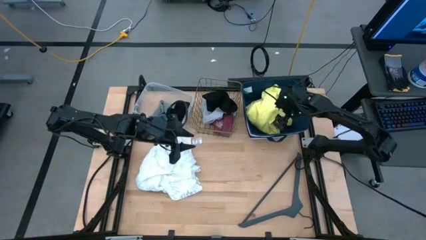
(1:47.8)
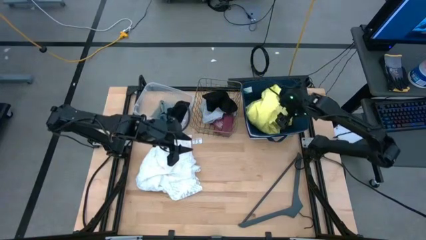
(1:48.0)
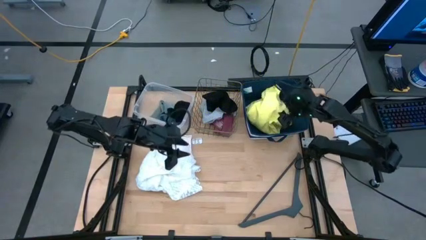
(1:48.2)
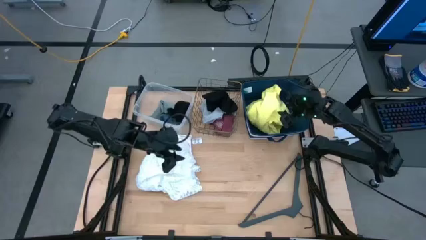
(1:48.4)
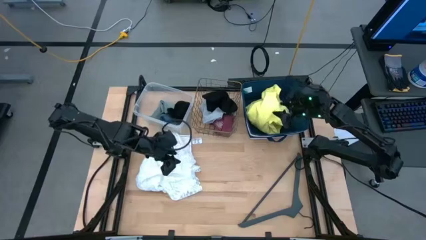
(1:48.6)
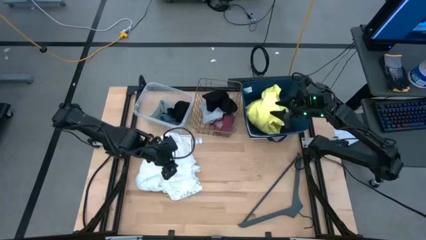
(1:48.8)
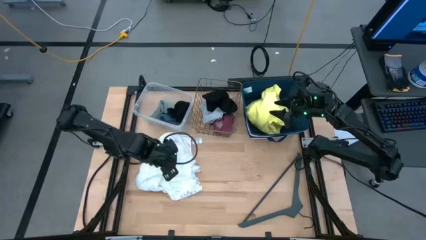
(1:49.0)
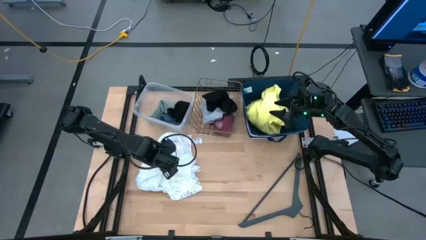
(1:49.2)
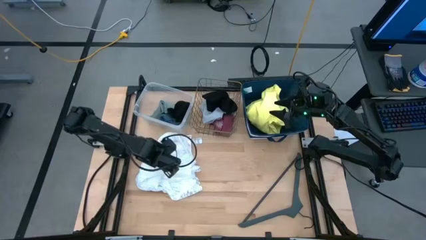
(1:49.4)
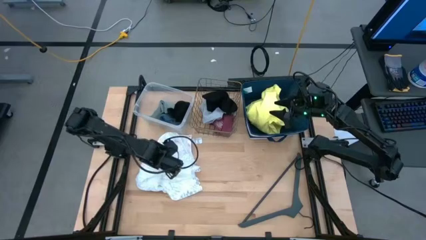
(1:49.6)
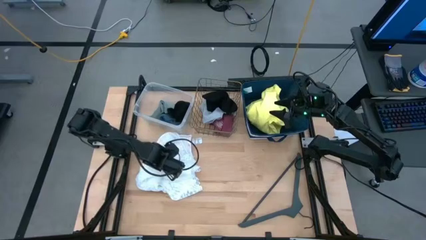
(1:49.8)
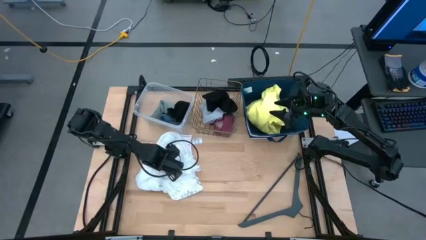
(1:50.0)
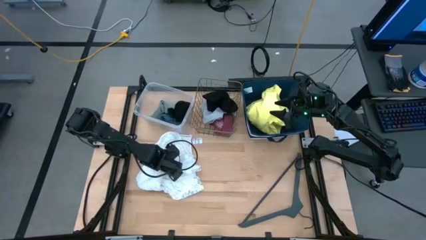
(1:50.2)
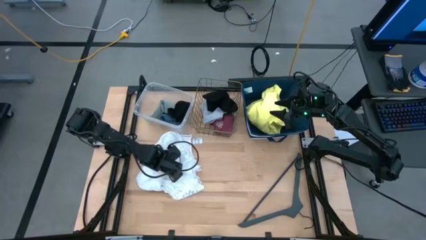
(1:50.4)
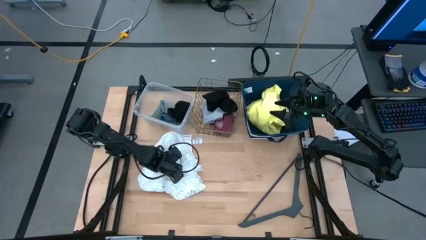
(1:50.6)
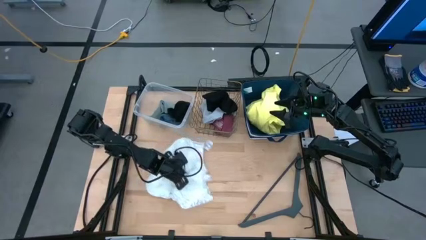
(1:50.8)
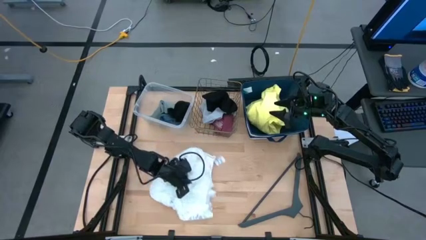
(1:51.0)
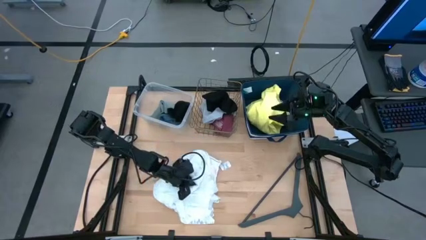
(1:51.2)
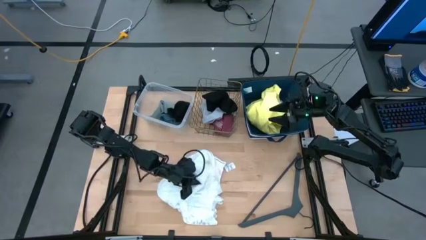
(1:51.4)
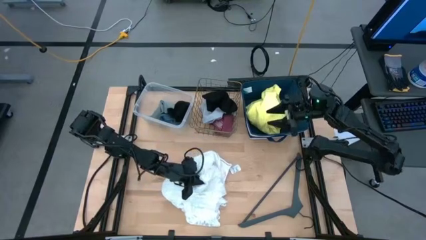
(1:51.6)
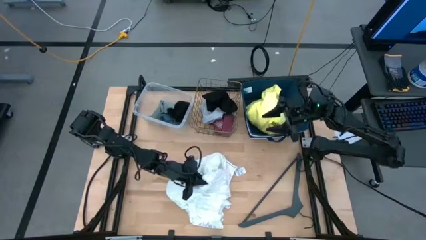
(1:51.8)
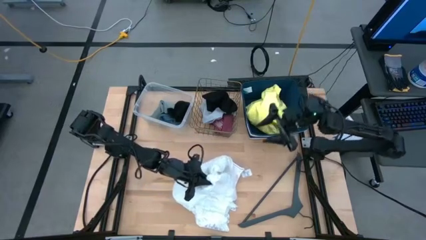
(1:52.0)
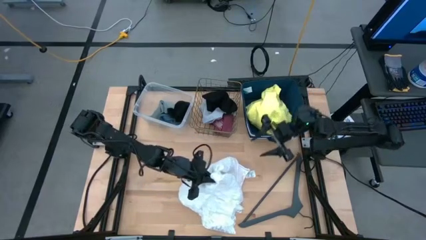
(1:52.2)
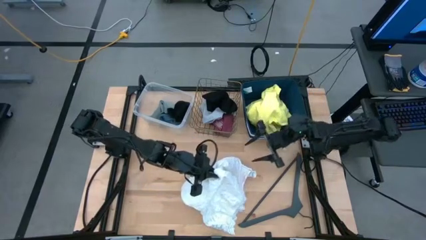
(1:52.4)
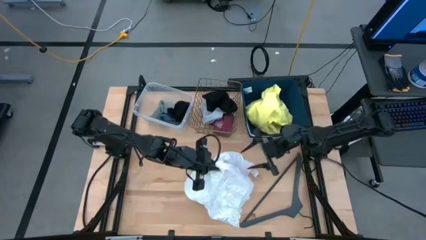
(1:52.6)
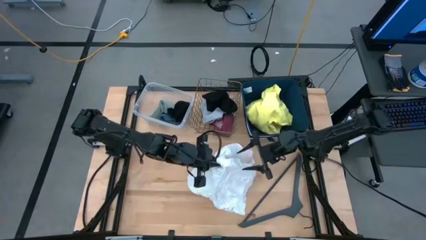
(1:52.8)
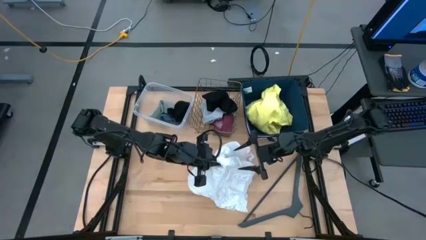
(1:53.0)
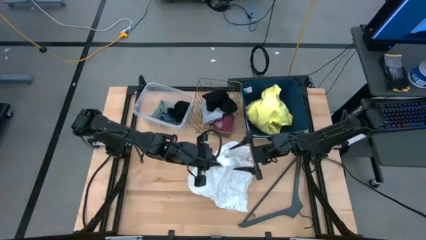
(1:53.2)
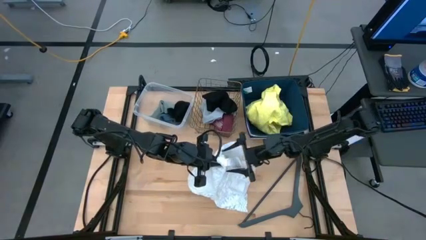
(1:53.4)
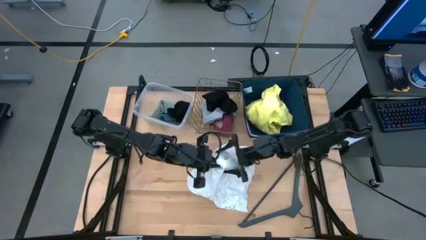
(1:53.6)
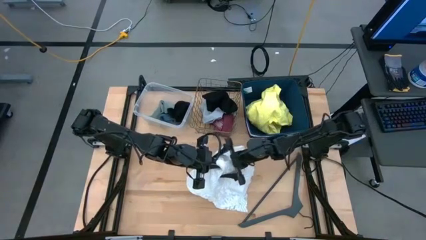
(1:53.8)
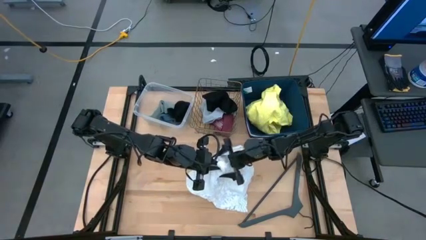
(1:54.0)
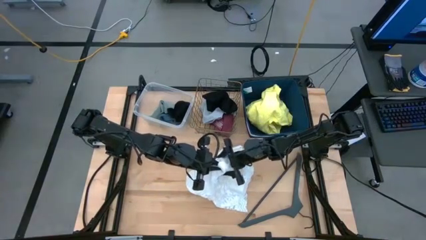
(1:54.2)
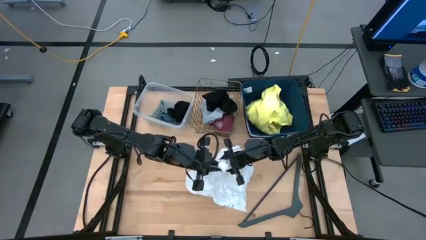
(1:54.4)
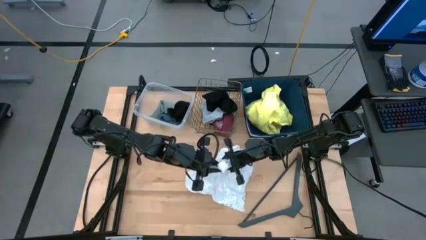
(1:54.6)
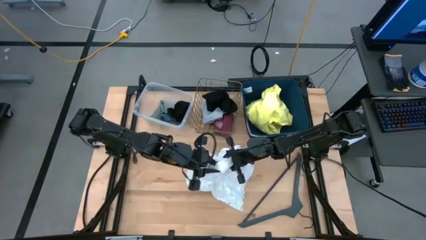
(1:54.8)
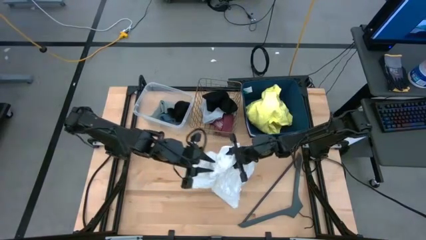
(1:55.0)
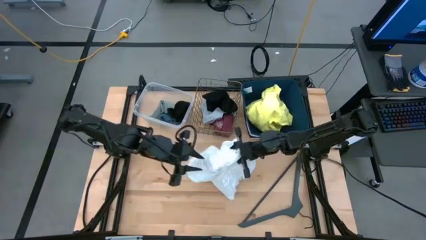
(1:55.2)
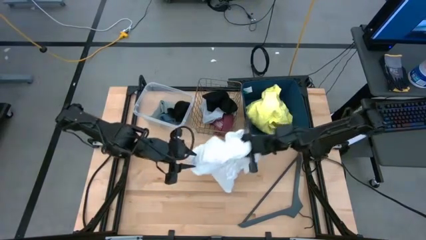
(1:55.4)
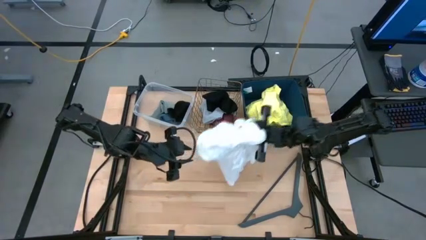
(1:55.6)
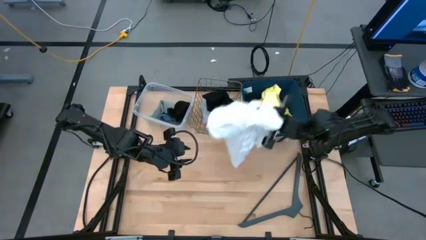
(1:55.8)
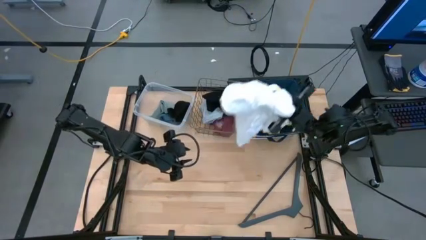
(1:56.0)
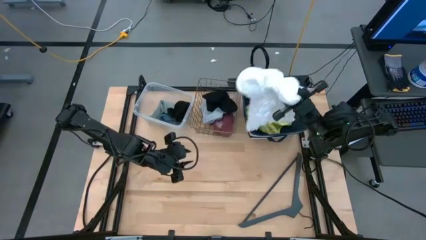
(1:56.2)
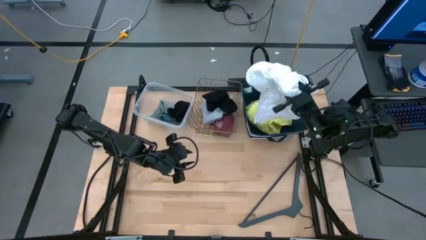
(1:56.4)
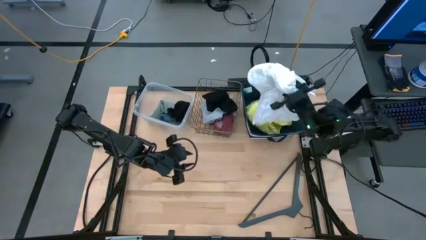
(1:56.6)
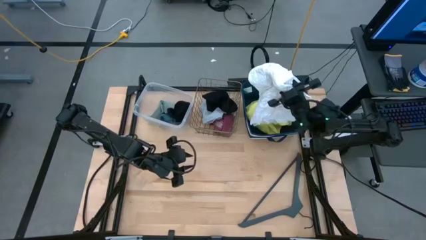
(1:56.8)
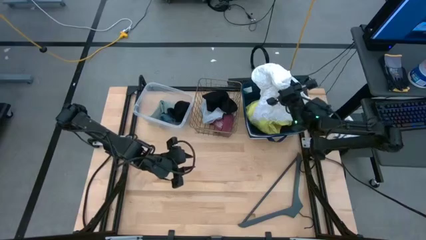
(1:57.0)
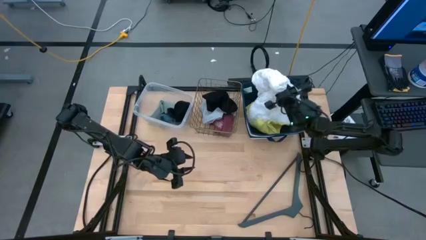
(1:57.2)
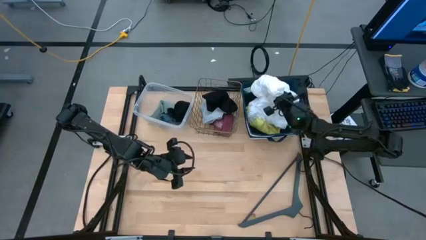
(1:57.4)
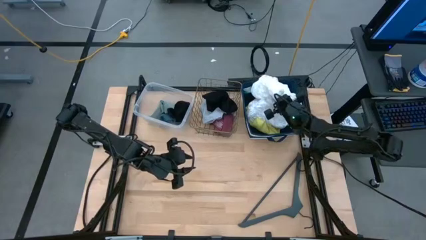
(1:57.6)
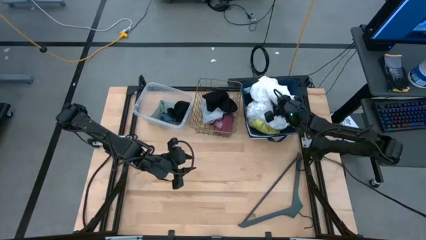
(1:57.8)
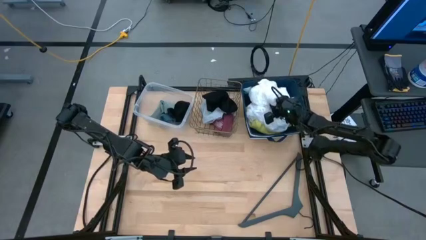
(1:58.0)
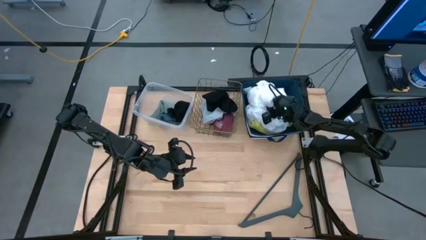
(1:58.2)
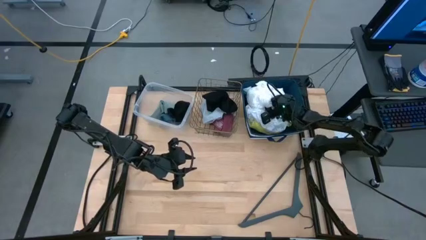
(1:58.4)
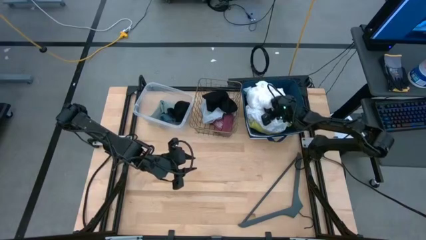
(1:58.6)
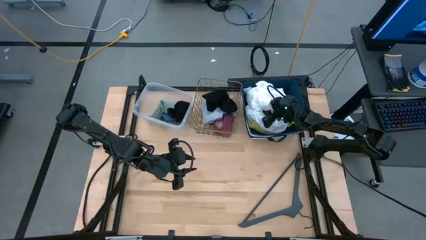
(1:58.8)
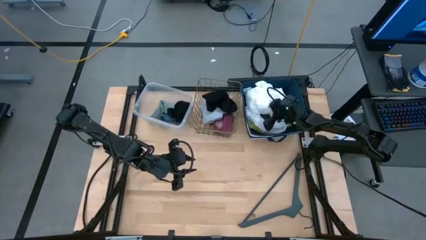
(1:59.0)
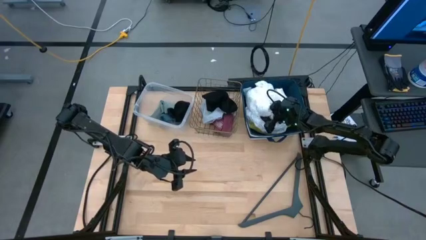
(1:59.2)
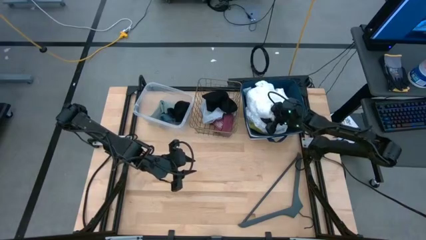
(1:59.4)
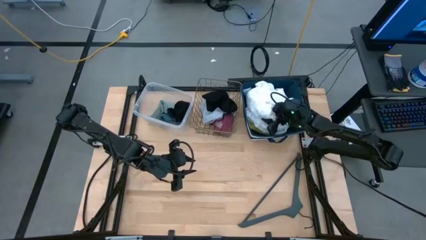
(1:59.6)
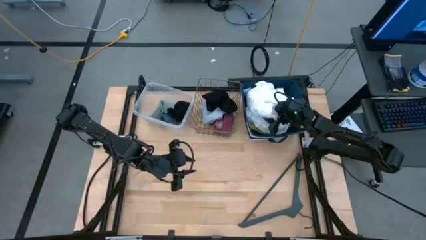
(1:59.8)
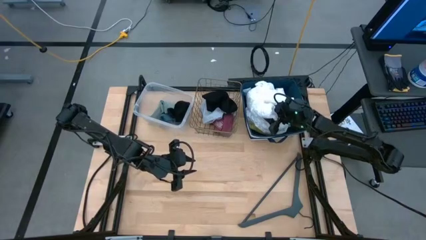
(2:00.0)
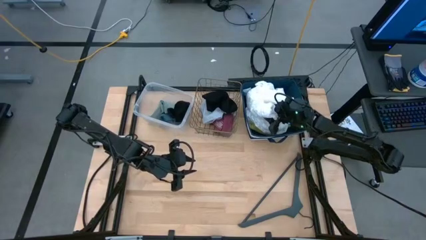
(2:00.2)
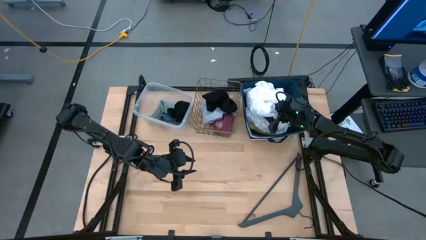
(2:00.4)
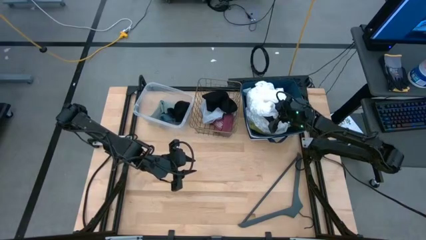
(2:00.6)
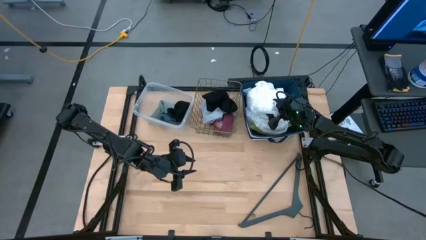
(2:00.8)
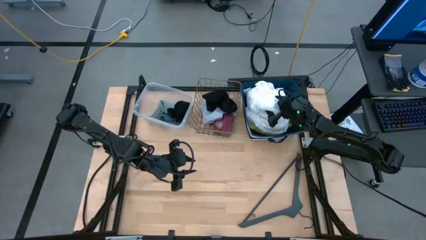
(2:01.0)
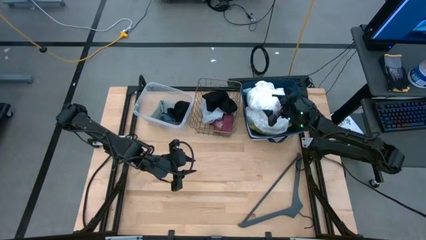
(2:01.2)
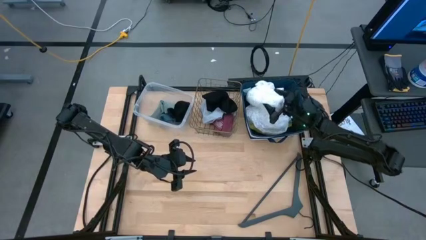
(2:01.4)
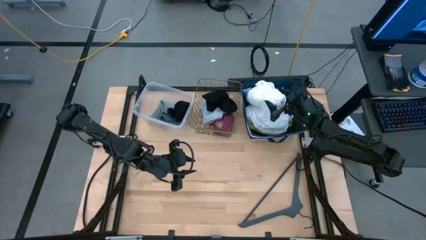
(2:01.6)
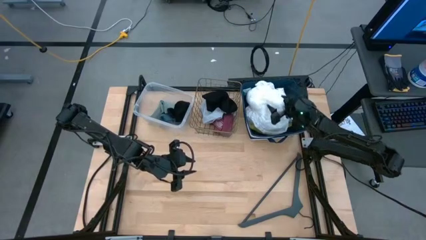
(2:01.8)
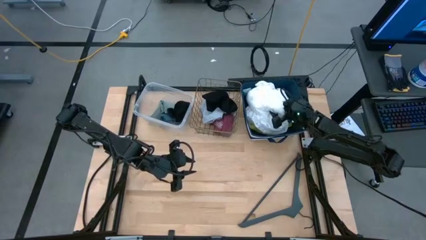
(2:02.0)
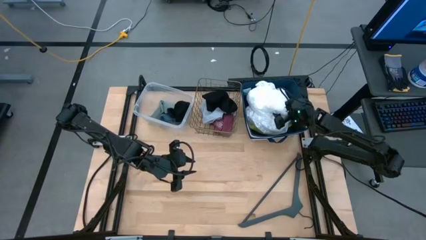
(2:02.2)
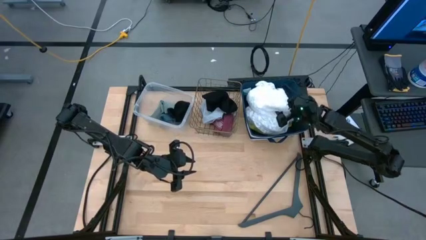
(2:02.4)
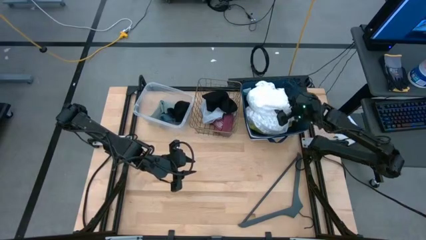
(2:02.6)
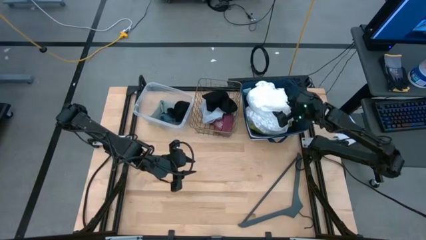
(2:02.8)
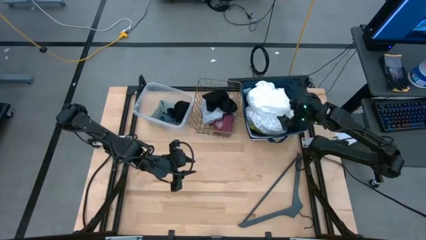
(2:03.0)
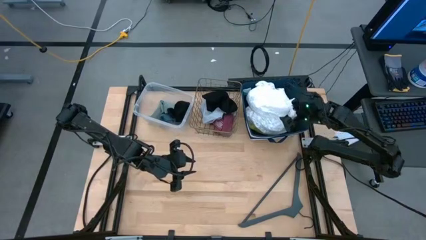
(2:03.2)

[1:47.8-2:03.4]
Task: Pick & Place Cloths
Put the white shirt into the blue bin

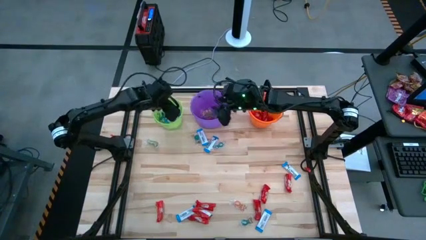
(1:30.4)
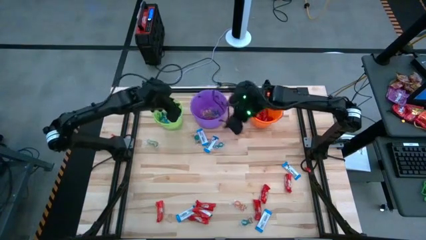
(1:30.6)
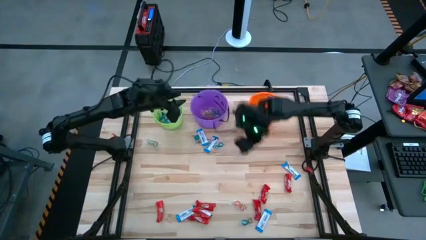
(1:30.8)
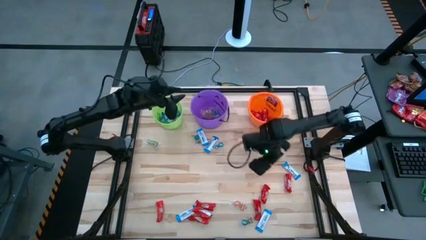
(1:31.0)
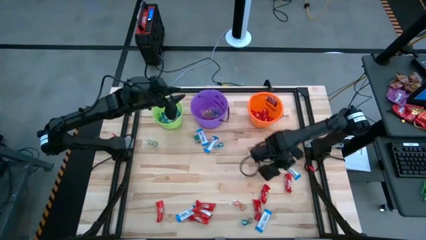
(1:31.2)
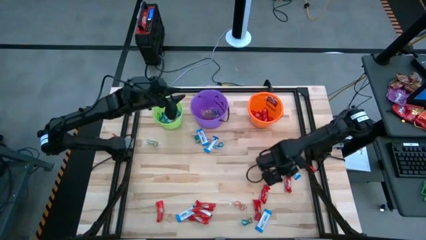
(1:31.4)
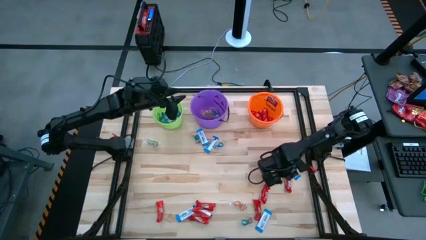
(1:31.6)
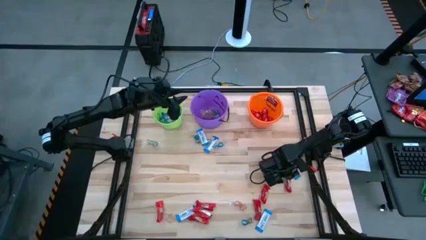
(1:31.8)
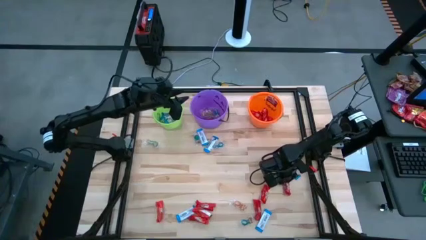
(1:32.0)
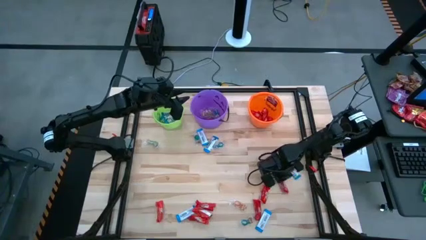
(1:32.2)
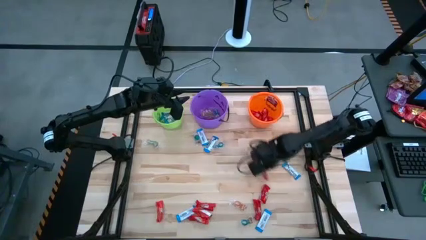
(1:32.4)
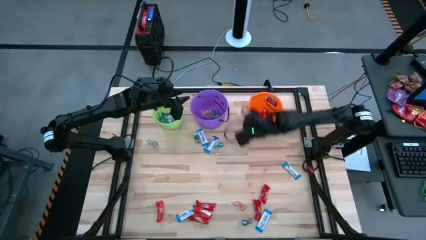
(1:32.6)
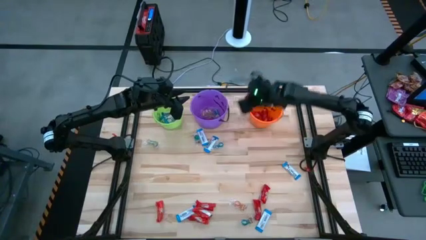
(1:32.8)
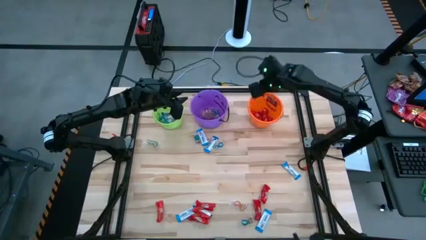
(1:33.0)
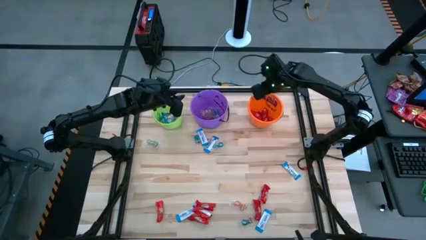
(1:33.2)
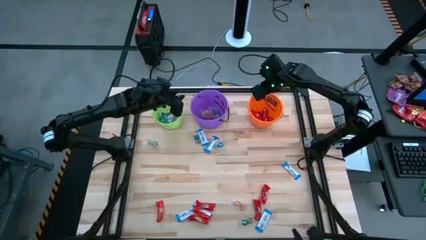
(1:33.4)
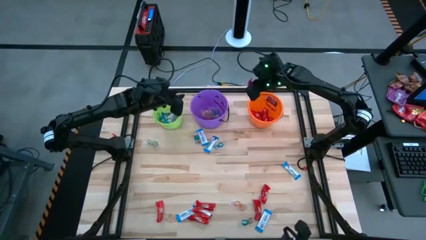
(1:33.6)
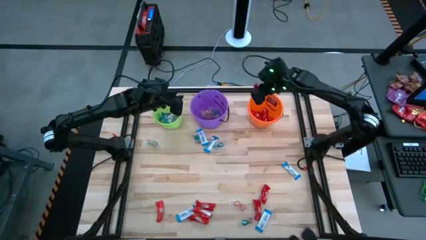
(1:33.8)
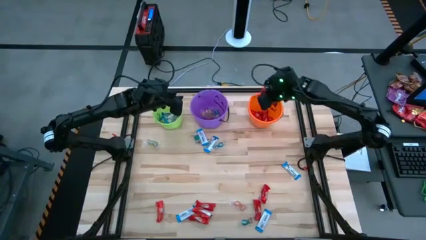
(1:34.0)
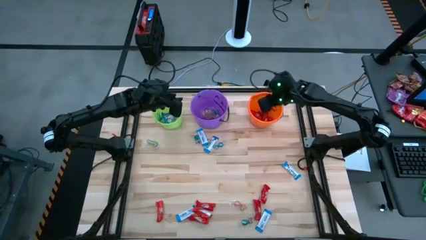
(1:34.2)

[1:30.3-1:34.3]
Task: Sort candy by brand, put in halloween buckets
Put the red chocolate into the orange bucket
